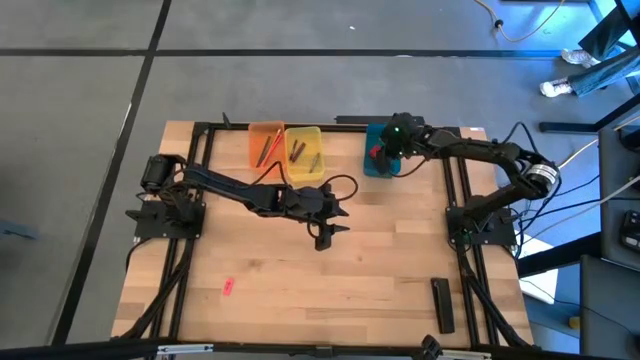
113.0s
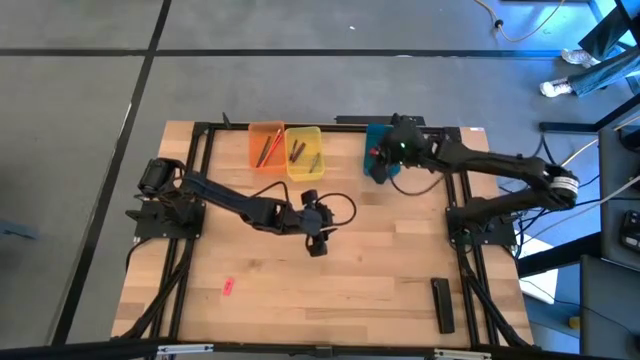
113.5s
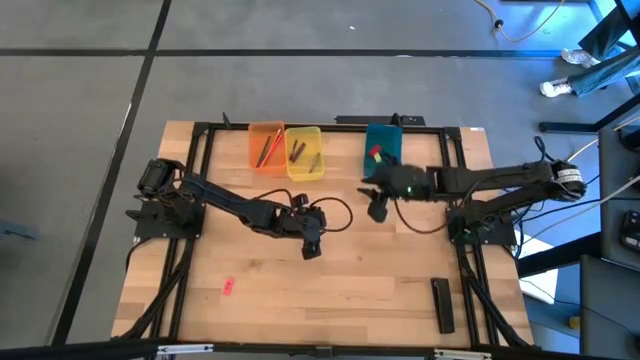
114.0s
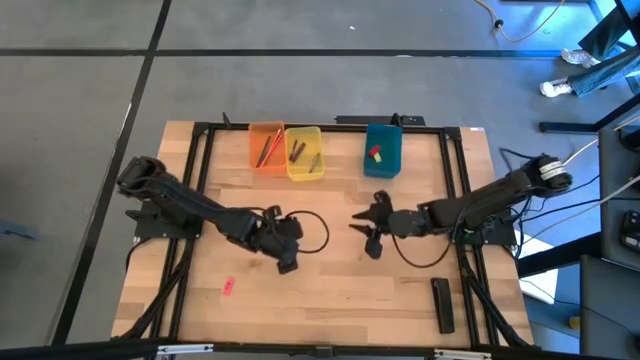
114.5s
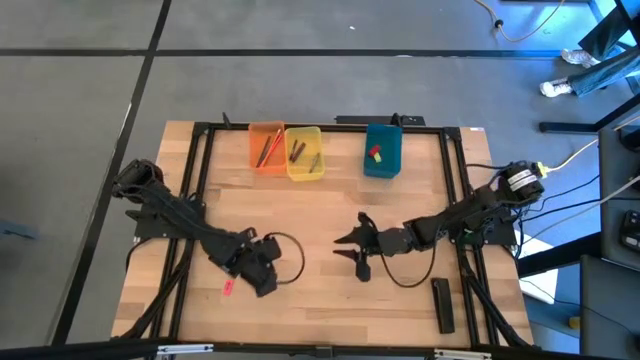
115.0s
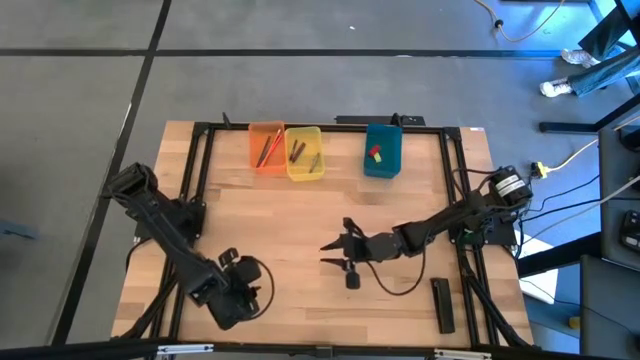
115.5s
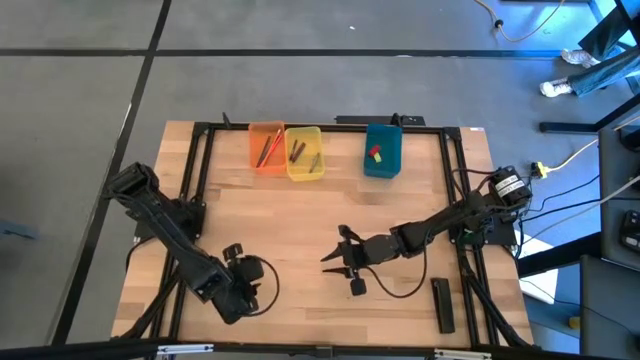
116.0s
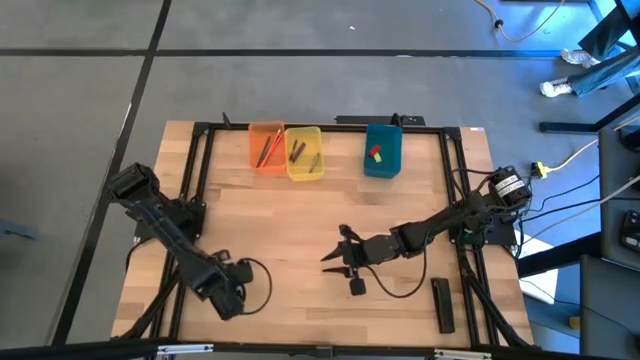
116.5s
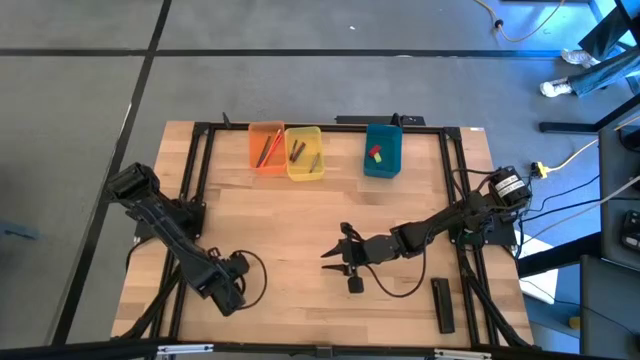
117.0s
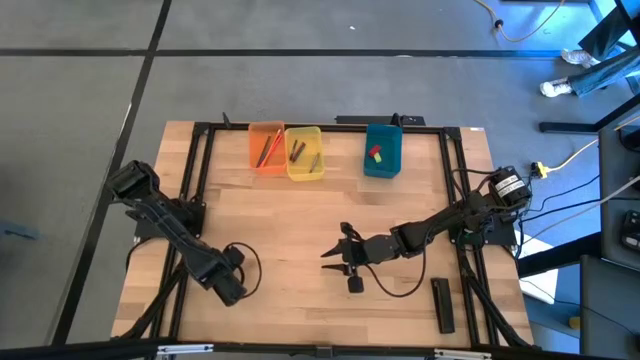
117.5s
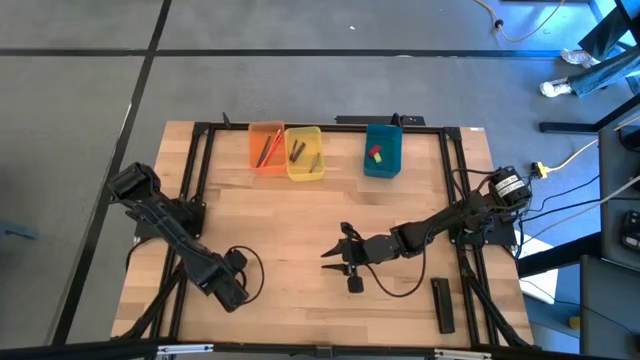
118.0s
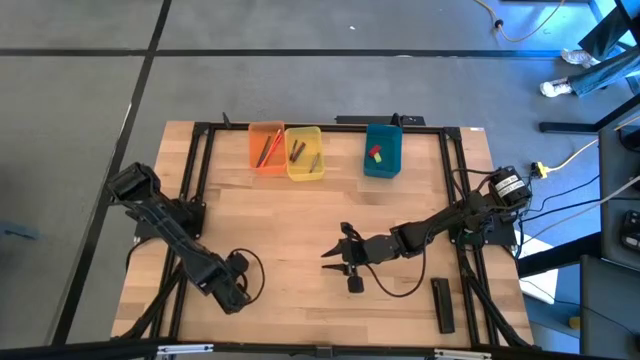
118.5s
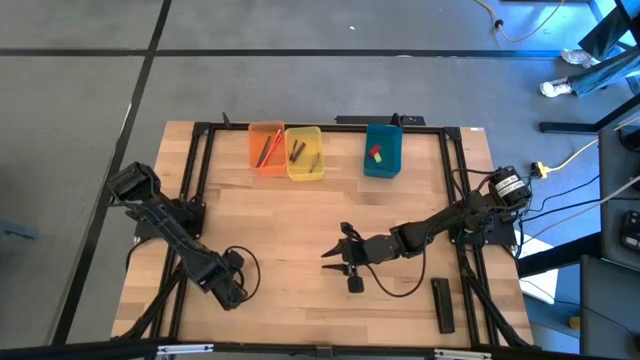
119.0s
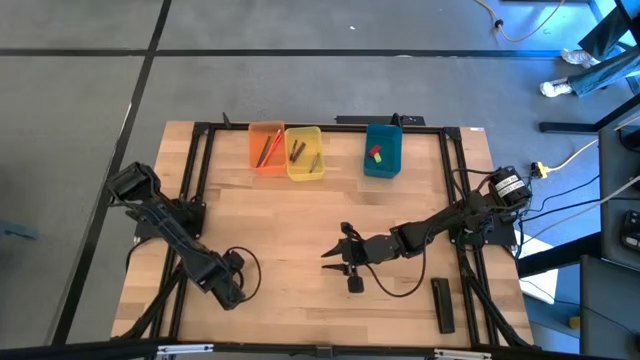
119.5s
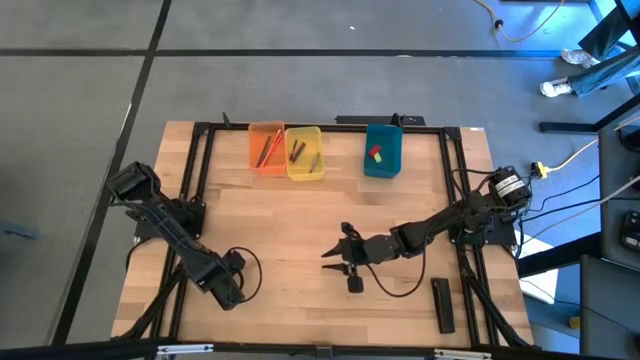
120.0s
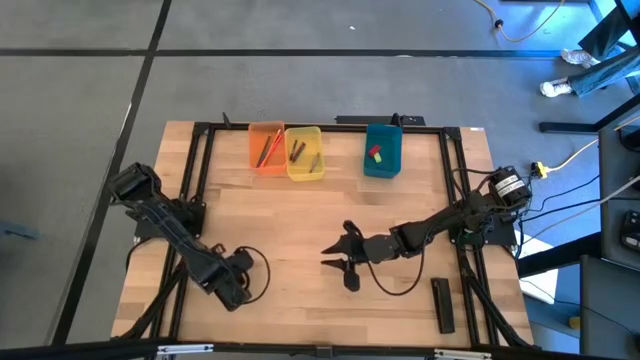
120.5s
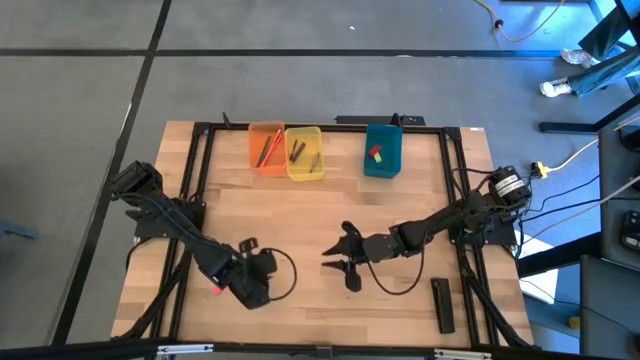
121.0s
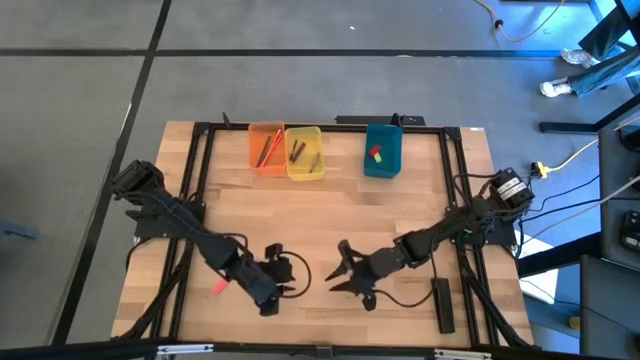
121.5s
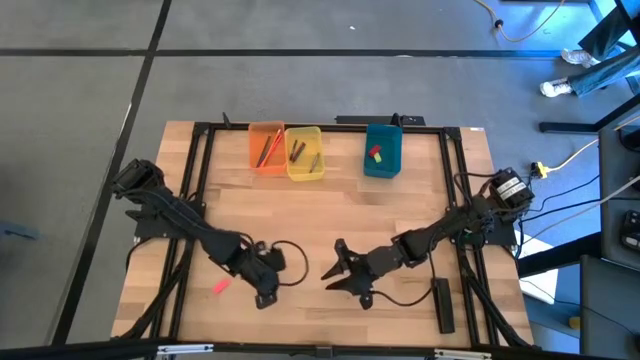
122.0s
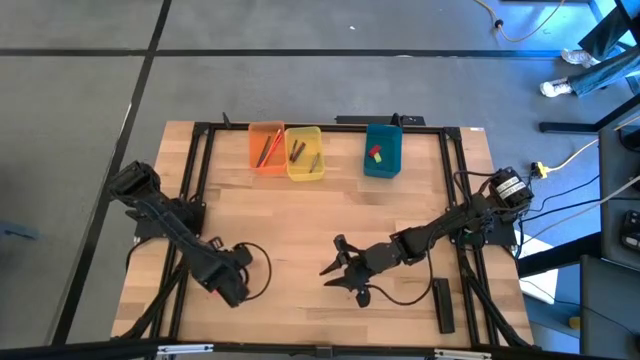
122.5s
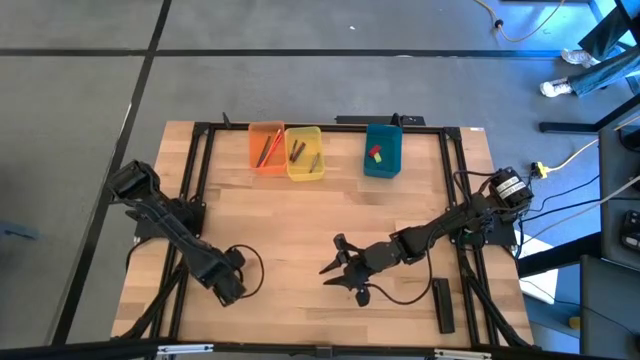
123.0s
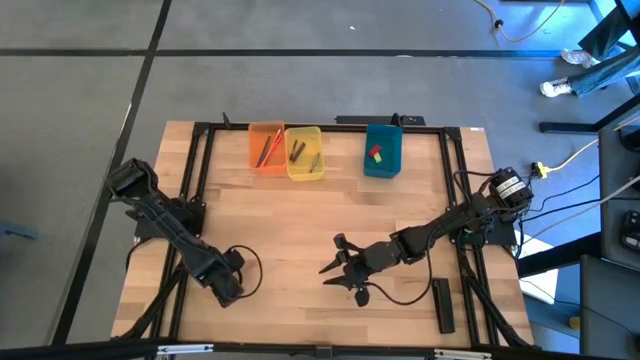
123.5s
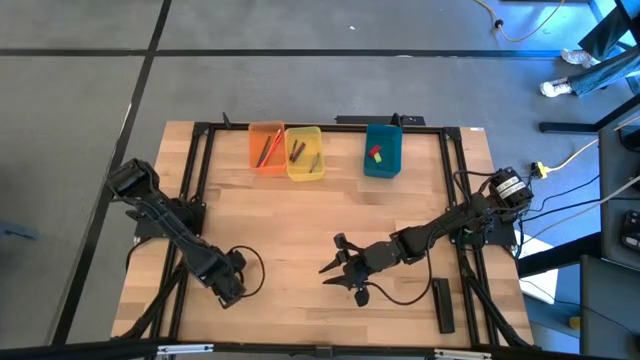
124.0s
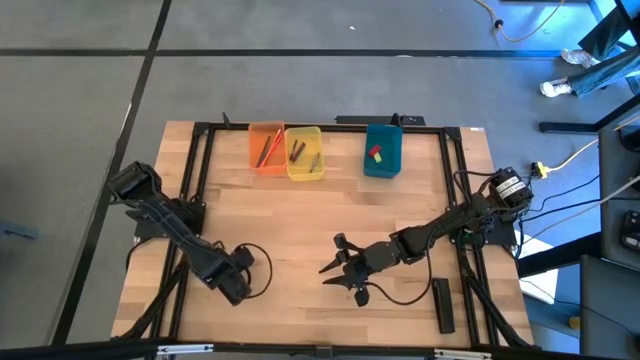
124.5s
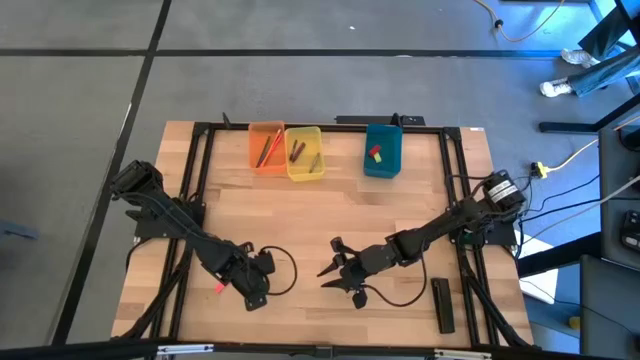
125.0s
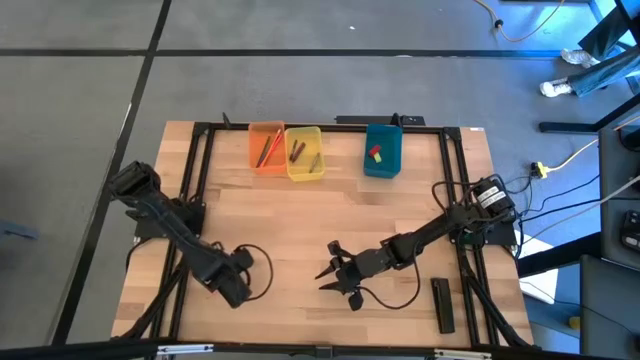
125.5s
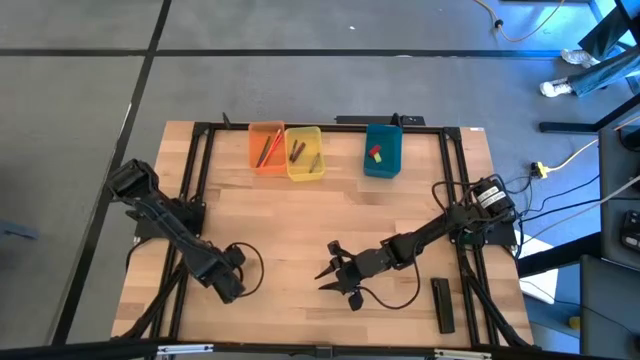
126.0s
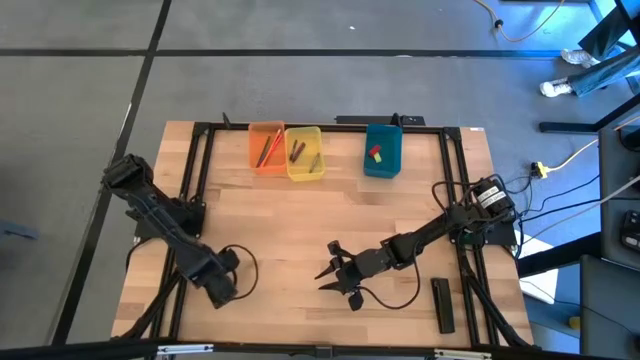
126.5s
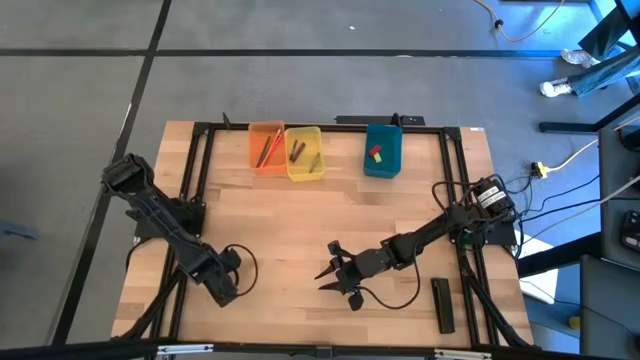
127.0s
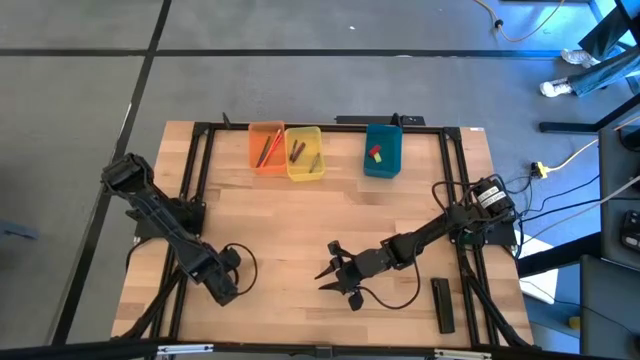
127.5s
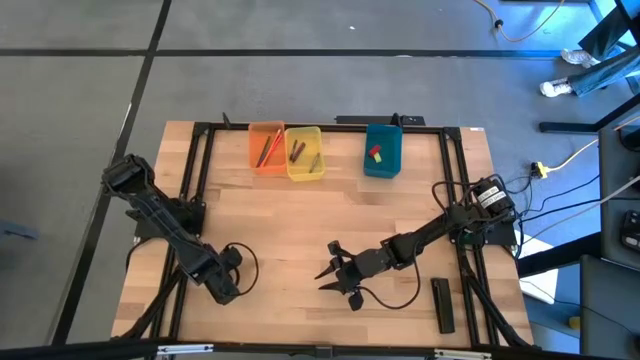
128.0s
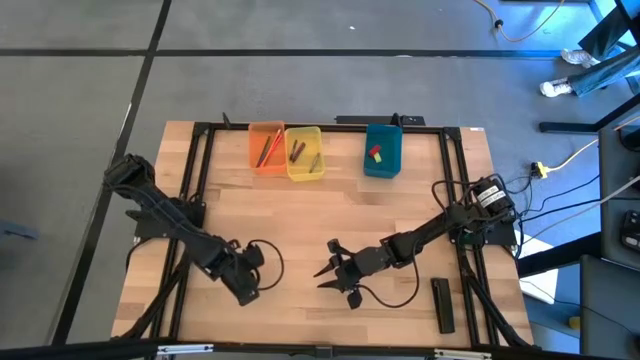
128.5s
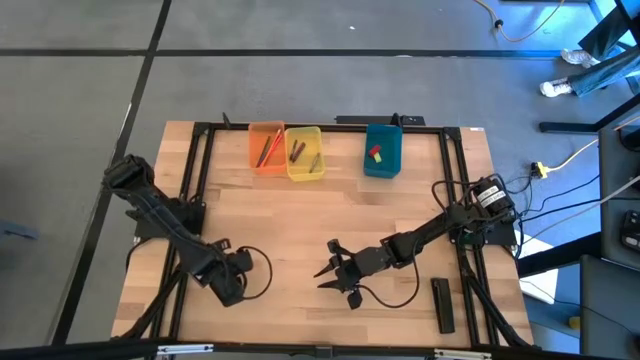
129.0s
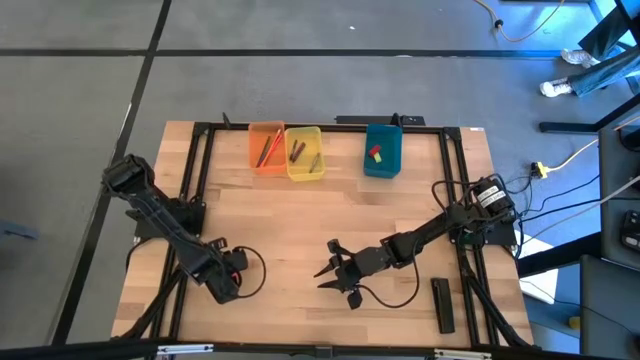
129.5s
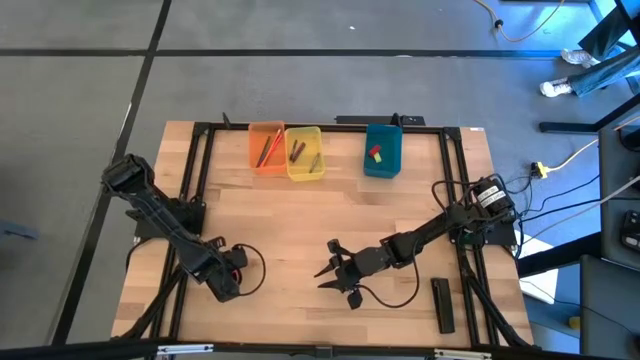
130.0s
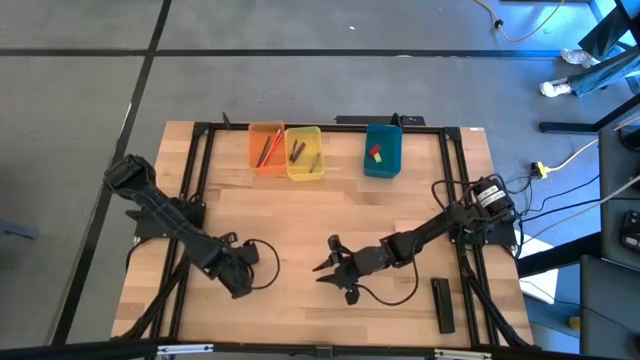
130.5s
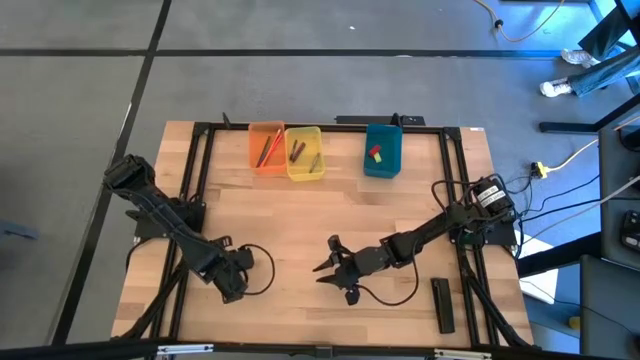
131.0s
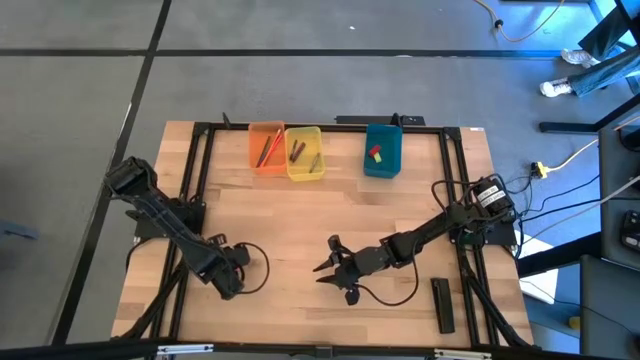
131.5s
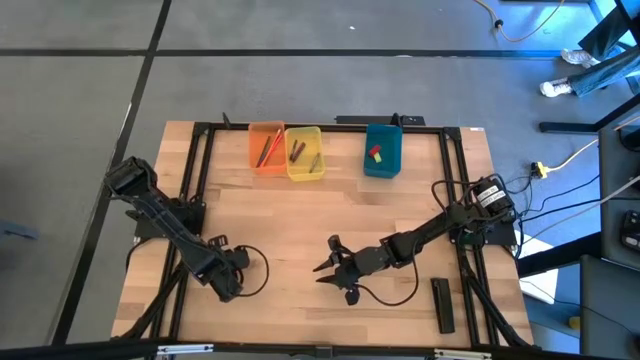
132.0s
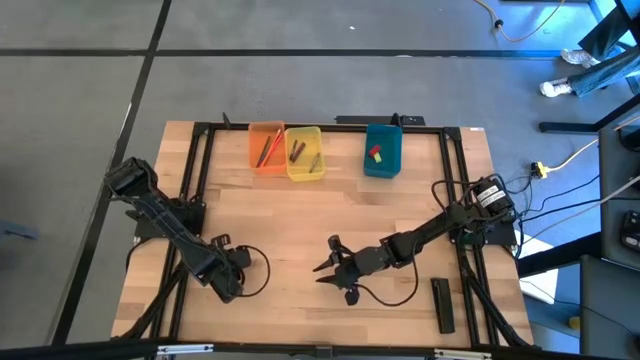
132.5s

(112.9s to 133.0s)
Task: Sort crayons/erasers/pens/pencils in bins
Put the pink eraser into the blue bin

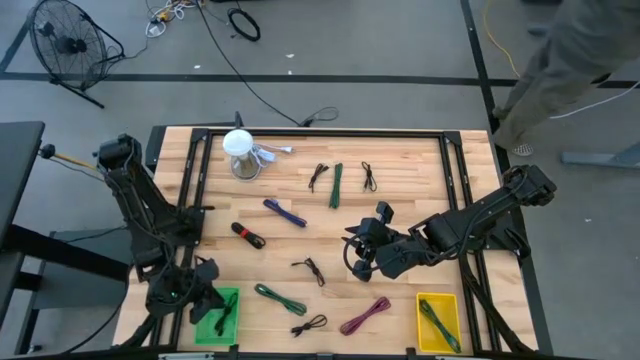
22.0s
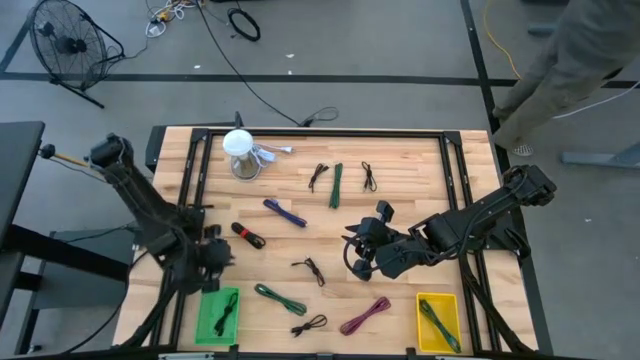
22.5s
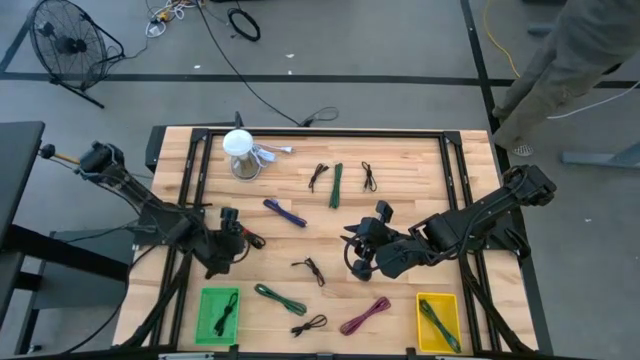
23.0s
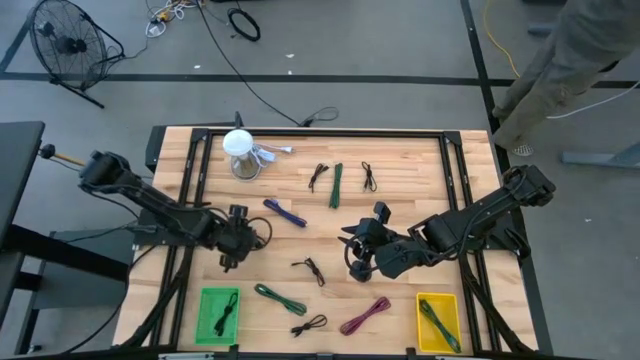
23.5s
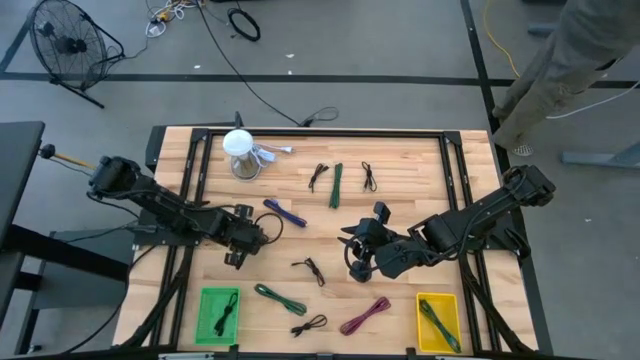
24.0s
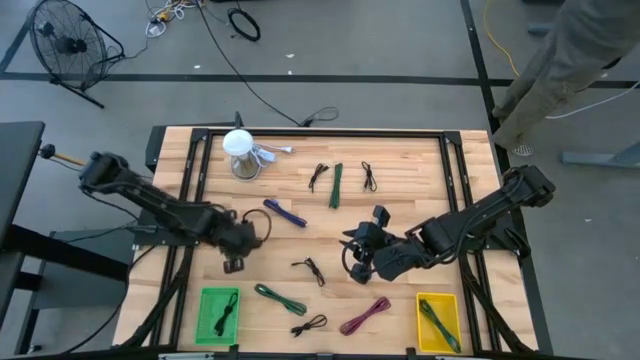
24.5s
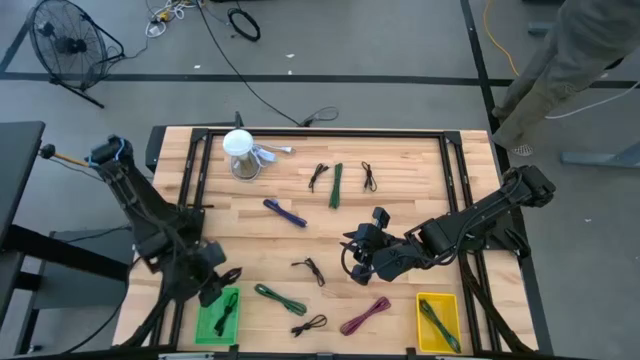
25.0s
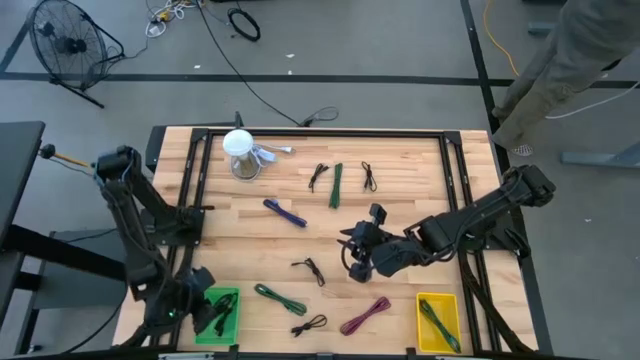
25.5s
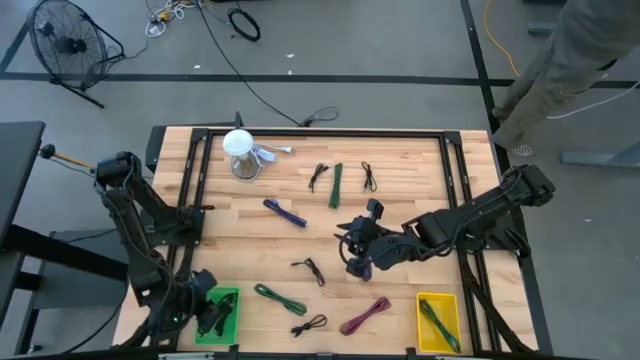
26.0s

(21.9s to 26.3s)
Task: Pick & Place USB Port
Put the black charger cable into the green bin
